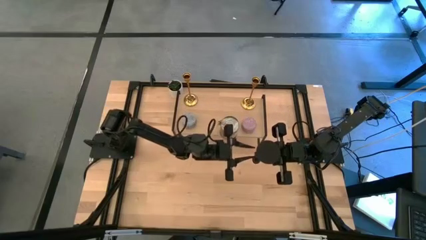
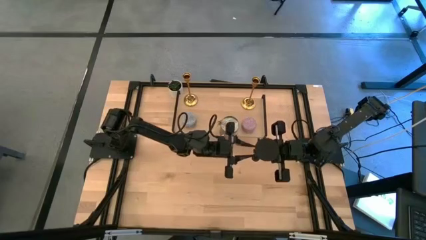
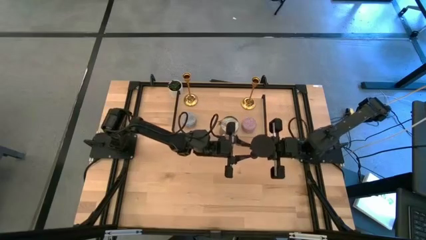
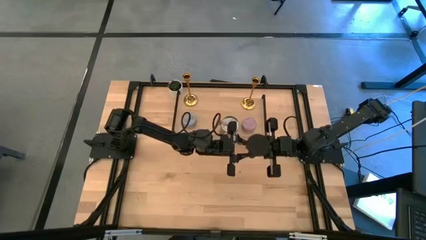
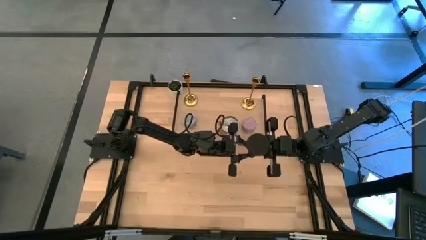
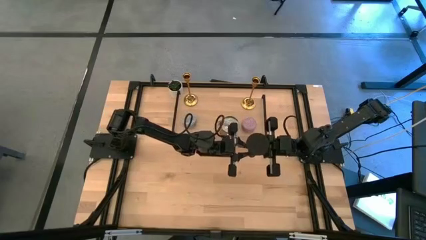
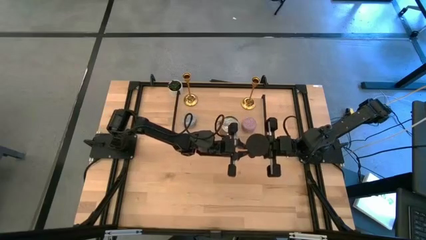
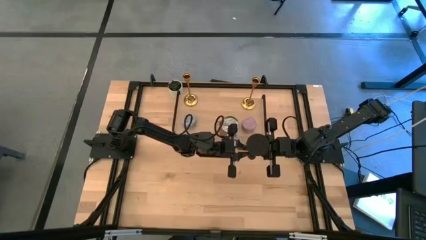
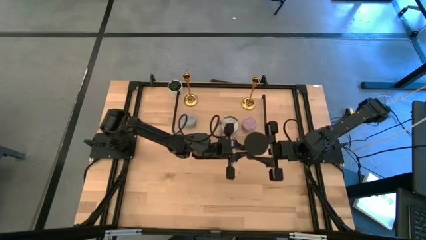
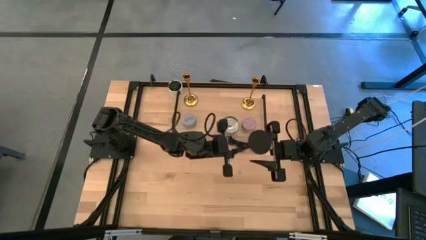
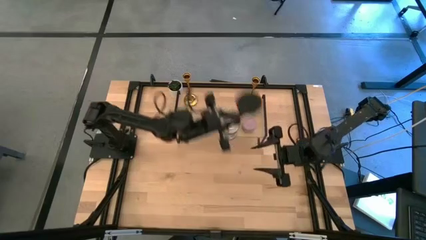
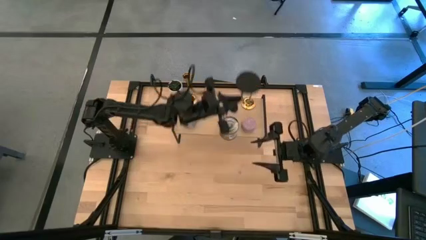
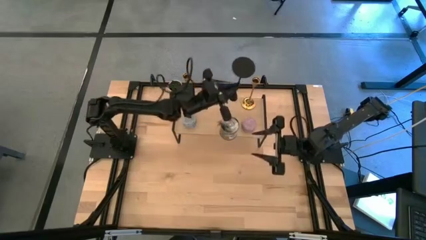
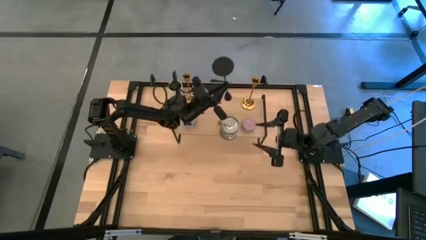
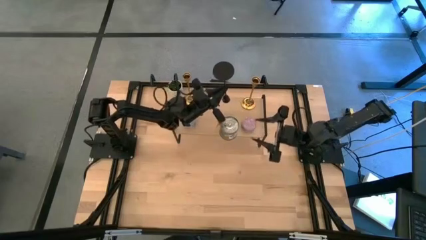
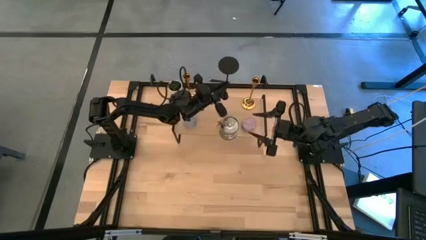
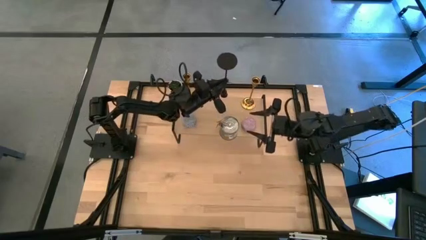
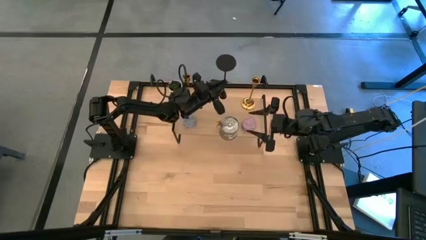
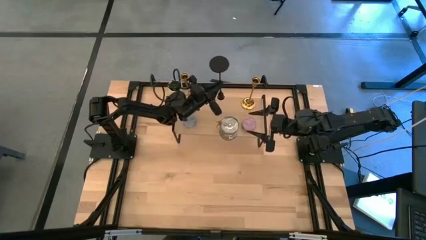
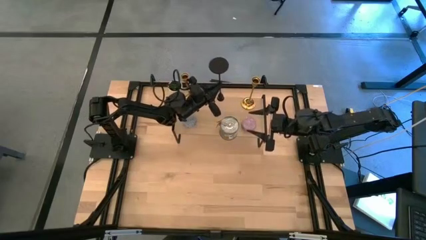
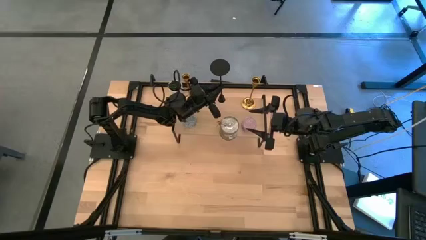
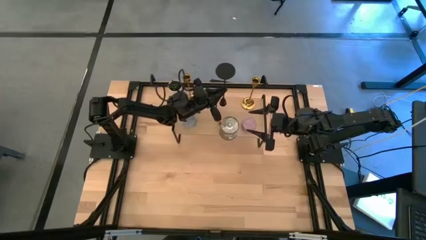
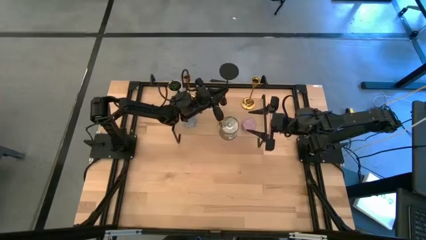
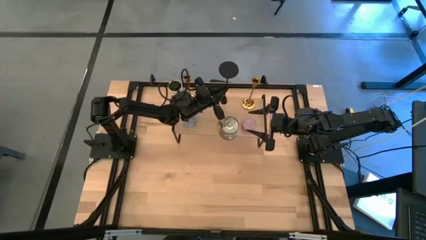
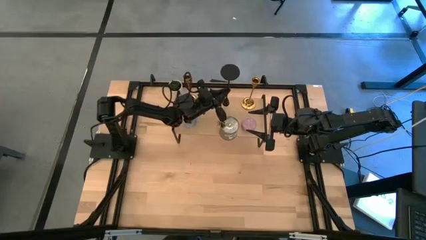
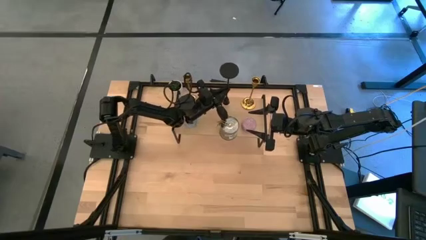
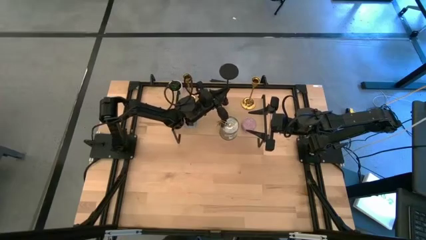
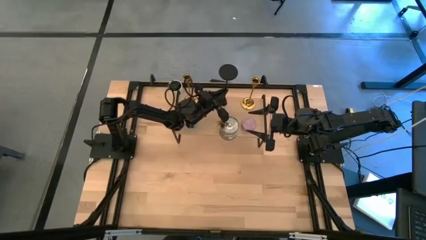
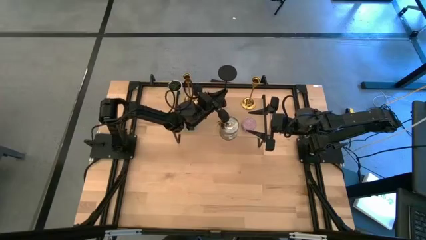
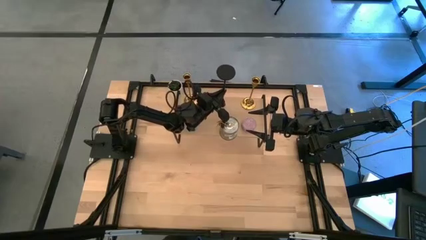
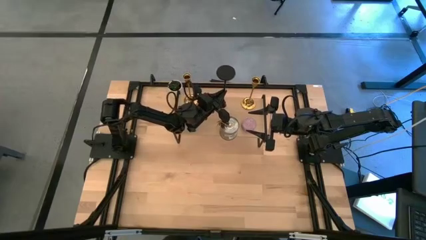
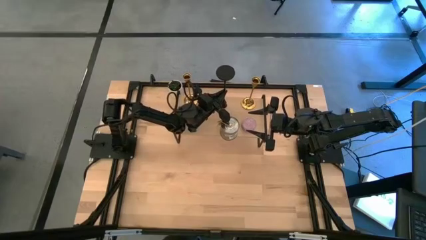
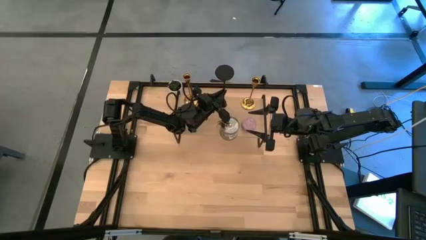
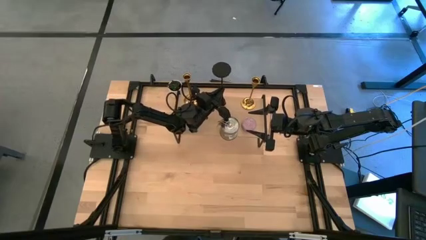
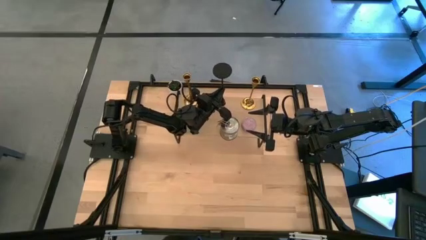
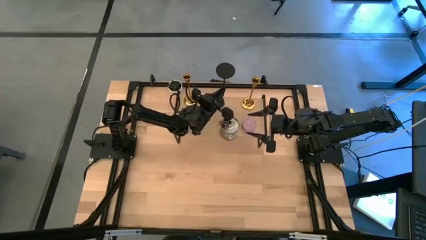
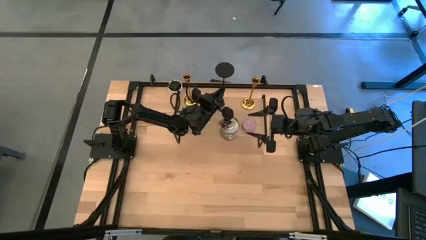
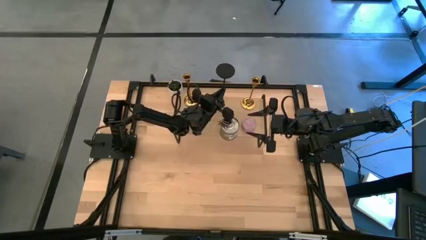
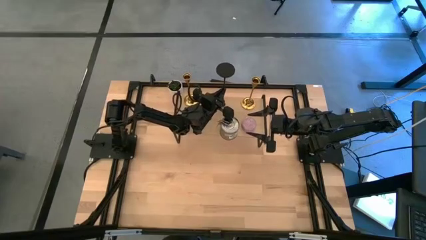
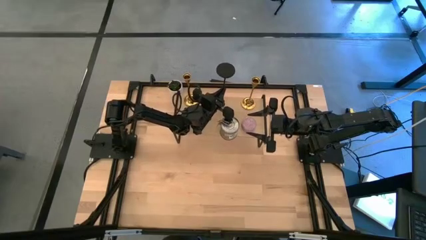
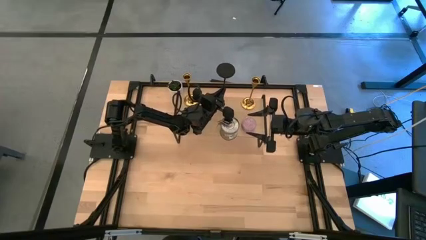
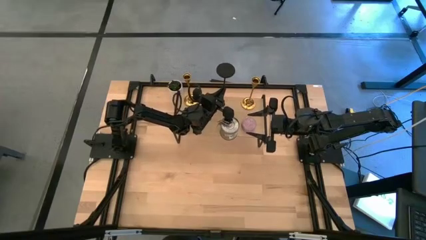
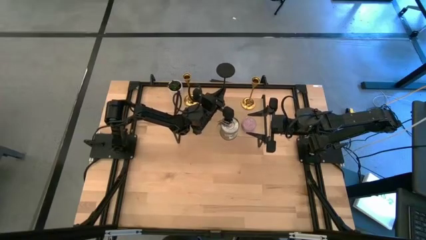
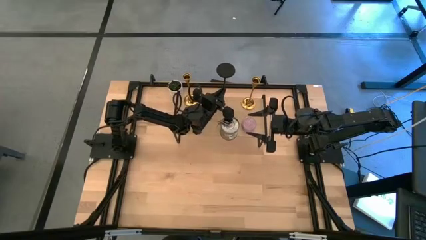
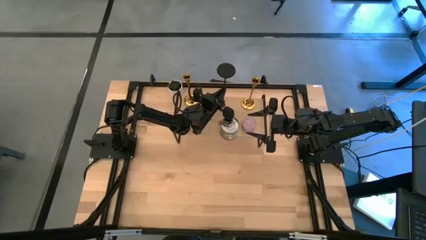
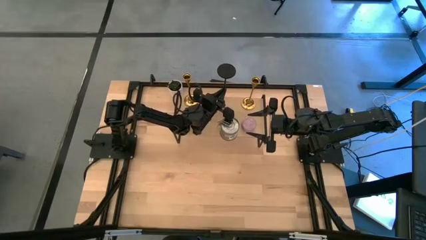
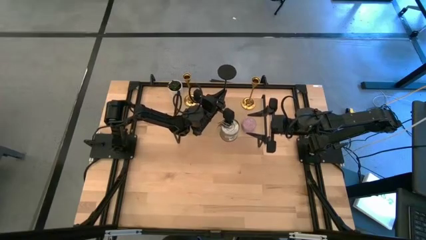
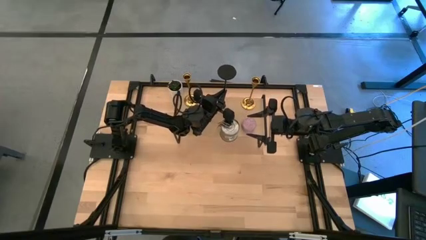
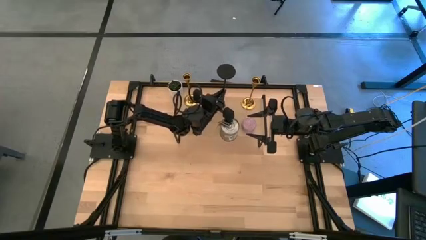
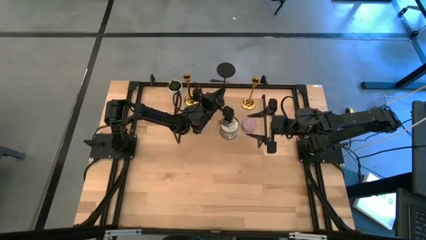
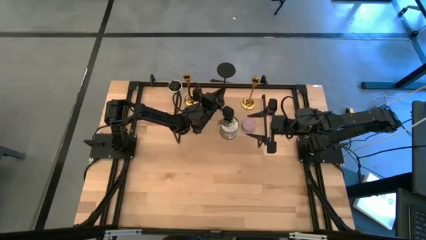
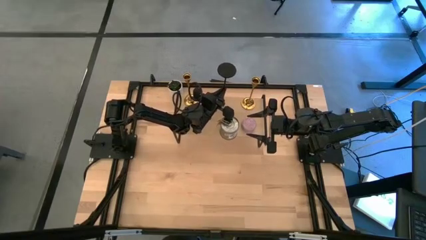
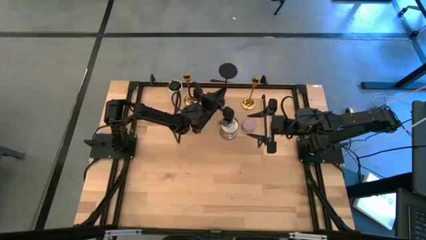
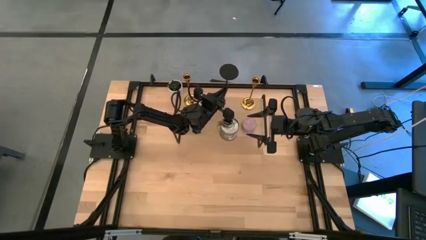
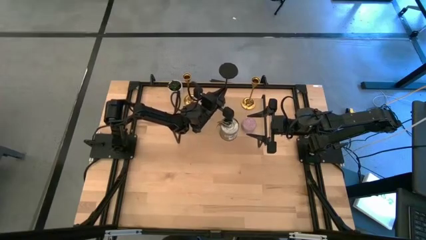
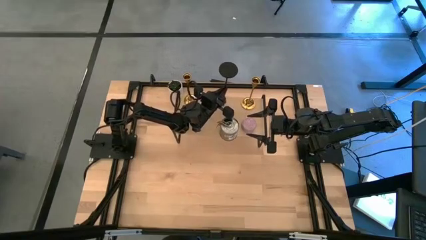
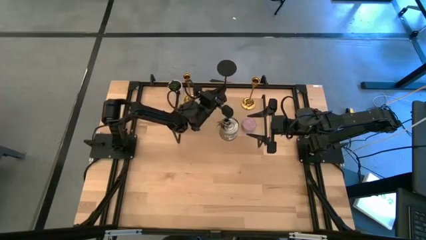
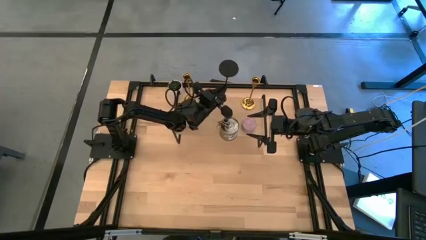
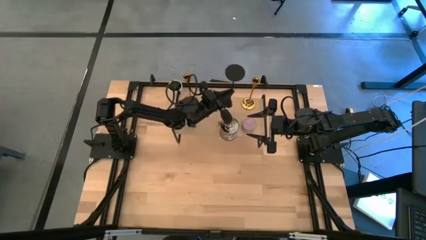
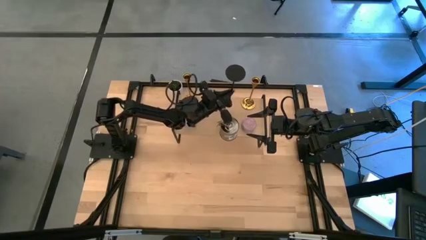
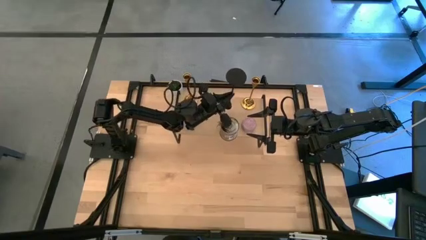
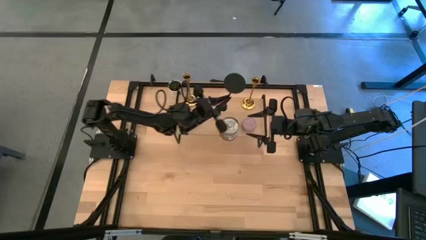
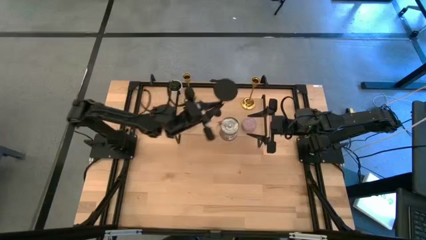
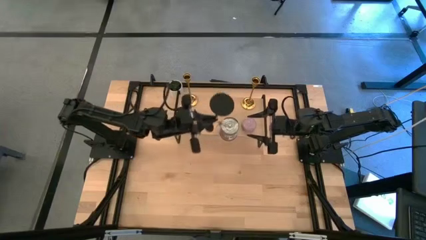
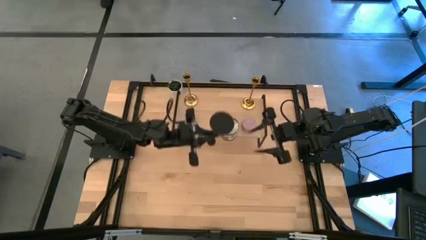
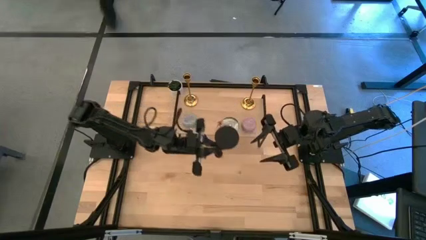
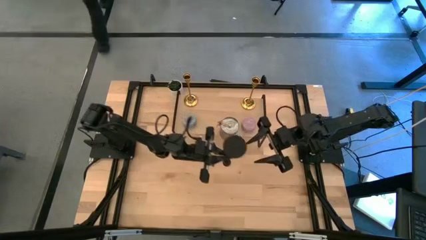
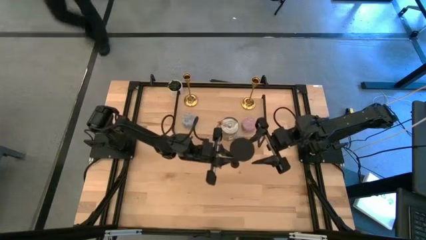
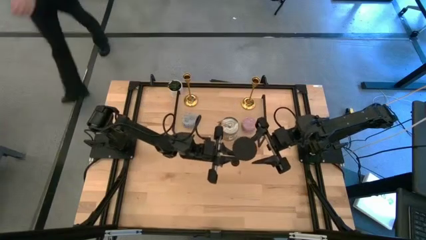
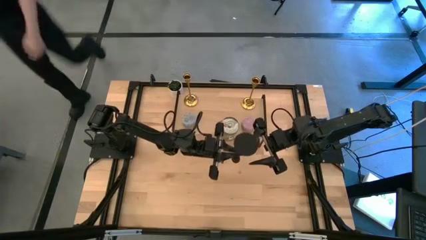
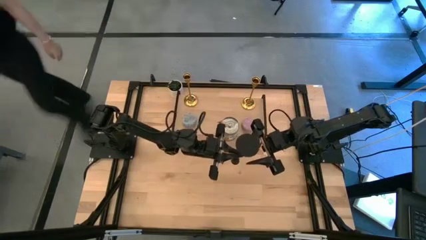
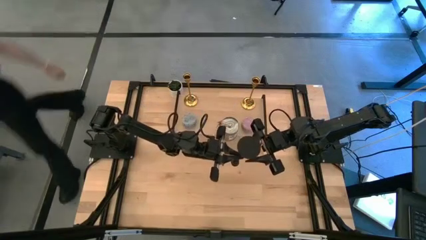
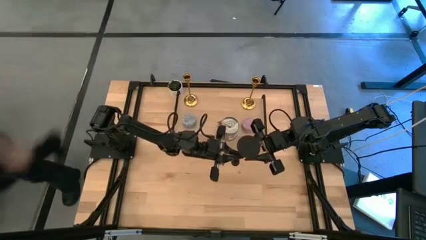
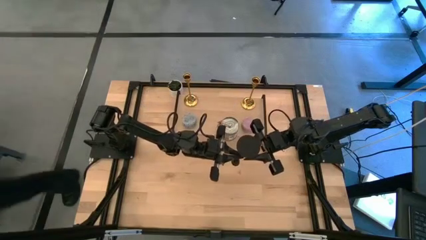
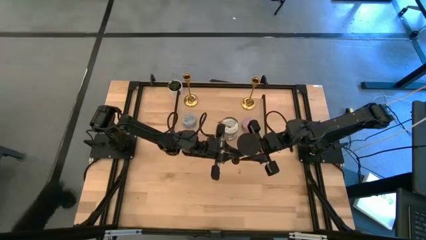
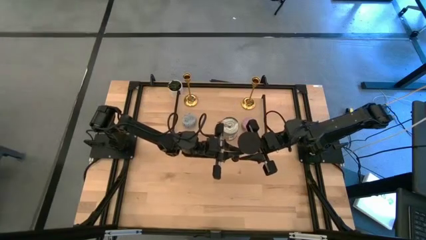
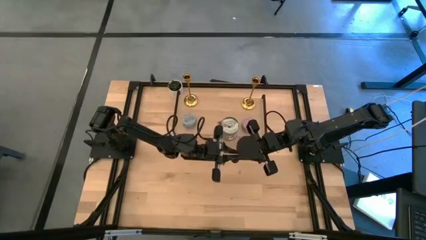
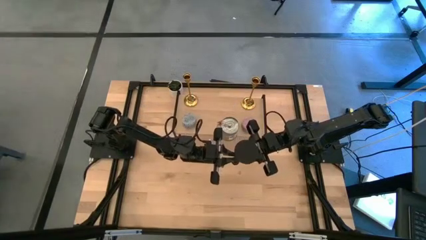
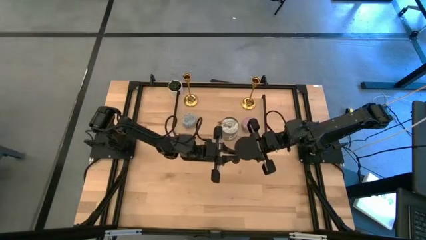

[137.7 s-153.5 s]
Task: Pick & Place candle stick holders
Put the black candle holder on the shelf
